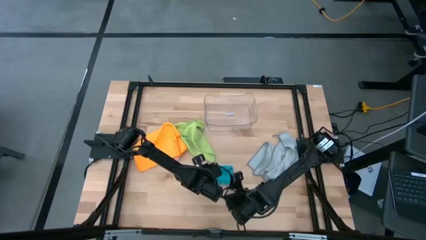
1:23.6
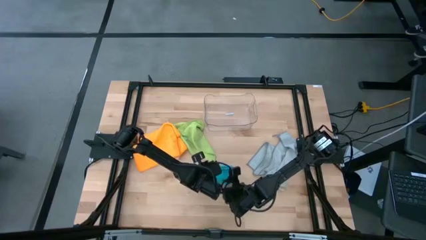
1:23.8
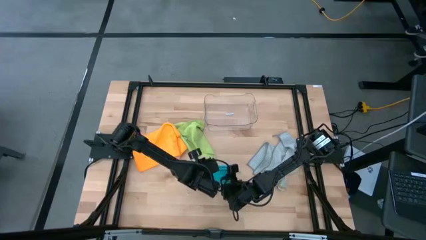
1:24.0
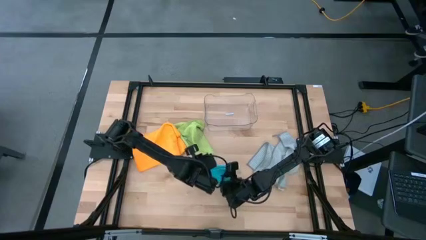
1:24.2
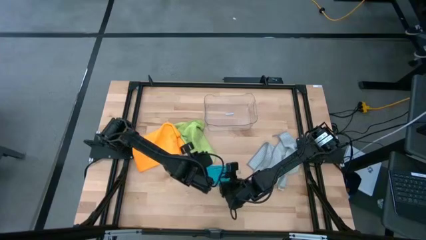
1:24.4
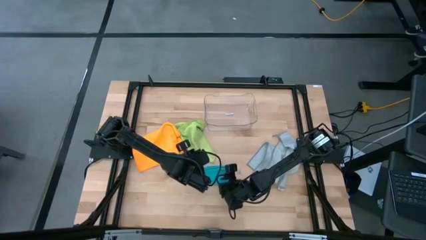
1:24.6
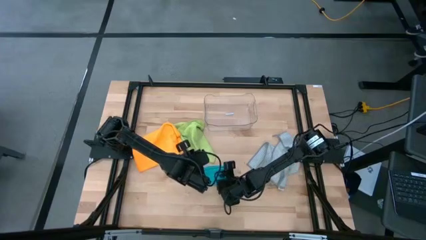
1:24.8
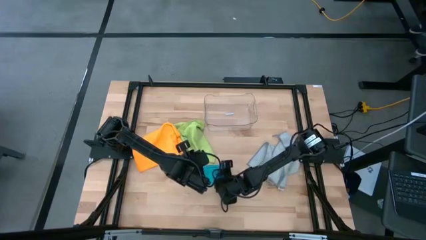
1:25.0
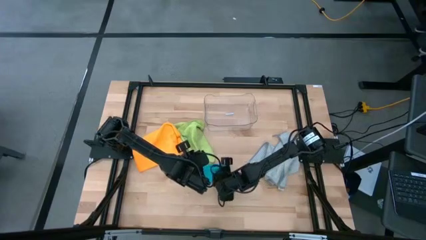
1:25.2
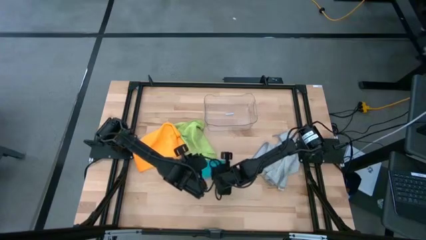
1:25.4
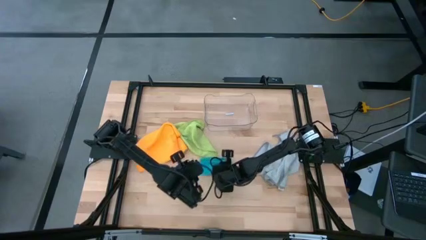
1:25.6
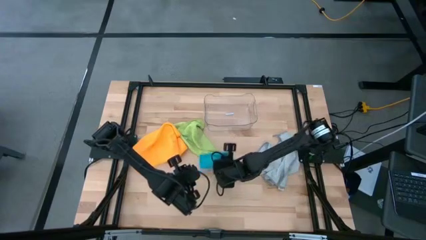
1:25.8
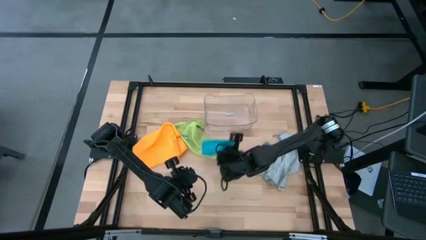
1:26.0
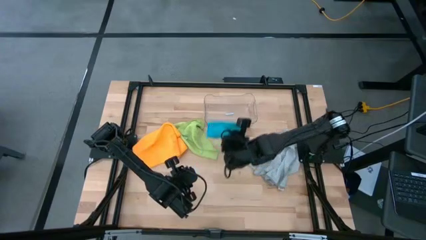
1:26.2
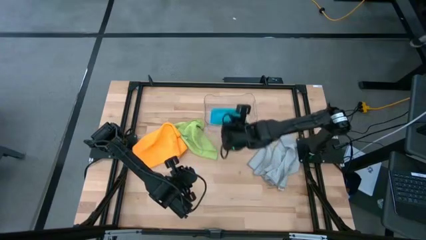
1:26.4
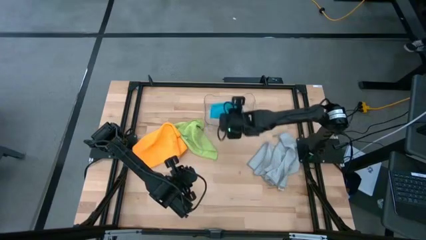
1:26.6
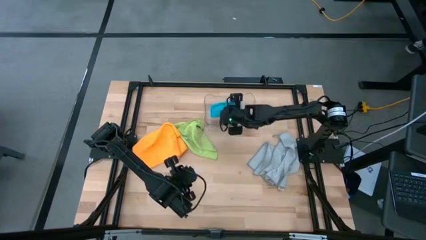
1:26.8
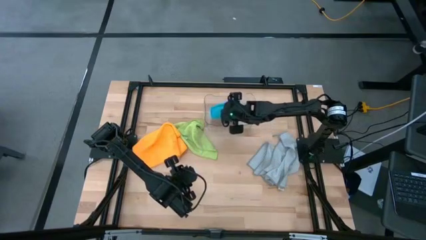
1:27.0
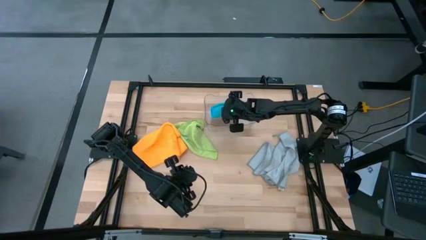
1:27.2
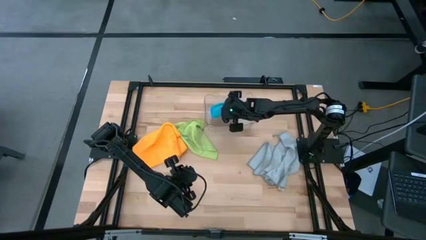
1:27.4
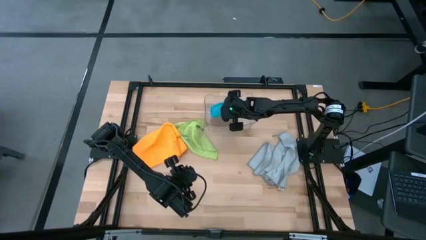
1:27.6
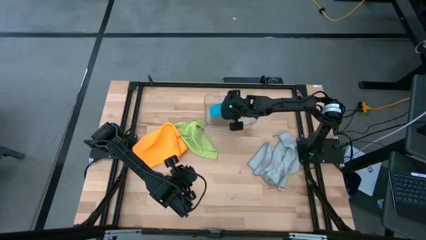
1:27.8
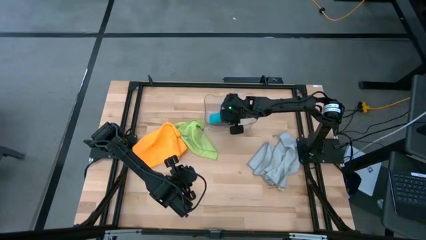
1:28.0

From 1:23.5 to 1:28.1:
Task: Fold microfiber towels
Put the blue towel into the transparent bin

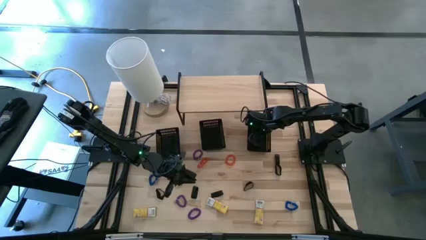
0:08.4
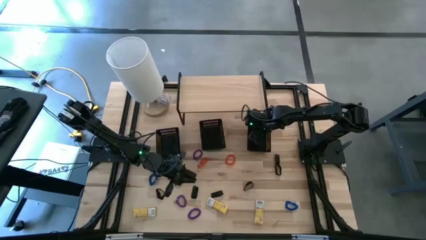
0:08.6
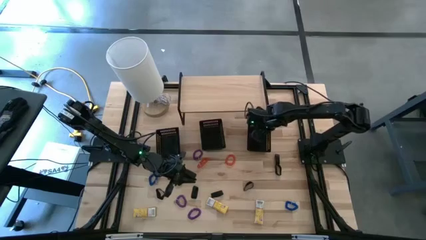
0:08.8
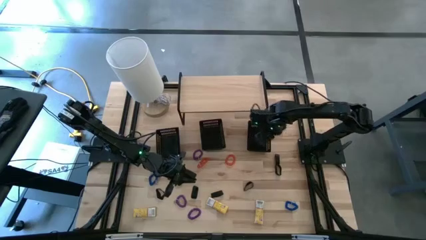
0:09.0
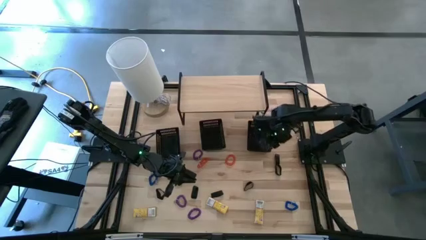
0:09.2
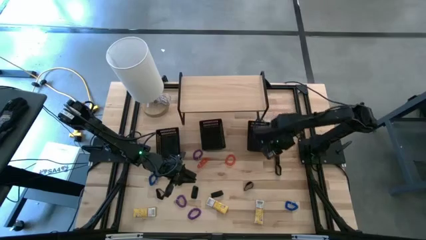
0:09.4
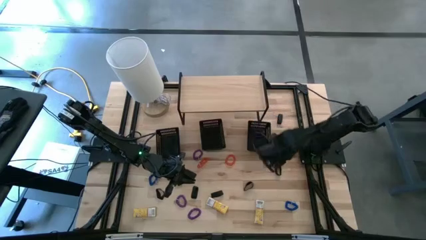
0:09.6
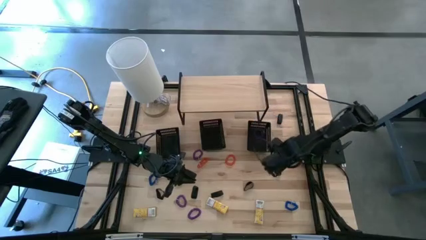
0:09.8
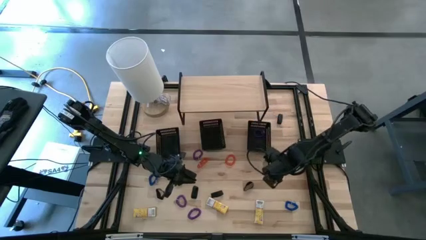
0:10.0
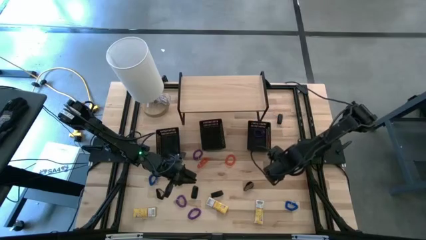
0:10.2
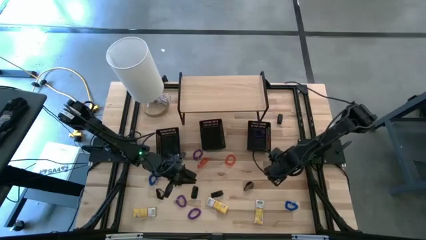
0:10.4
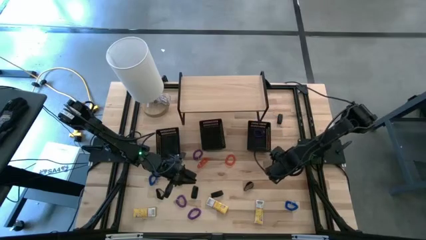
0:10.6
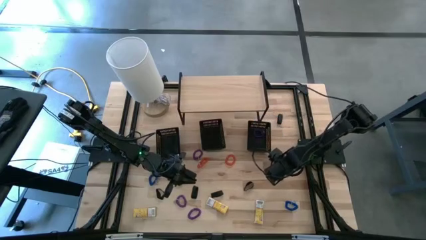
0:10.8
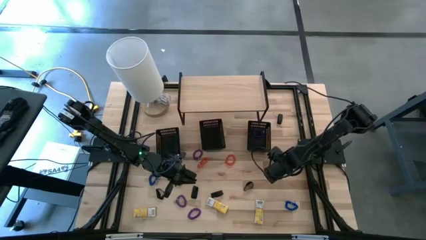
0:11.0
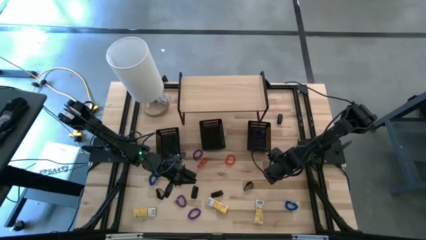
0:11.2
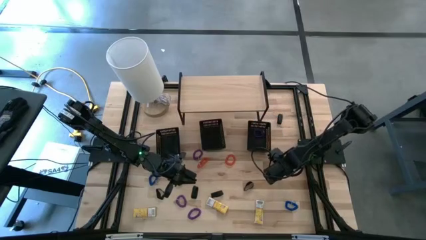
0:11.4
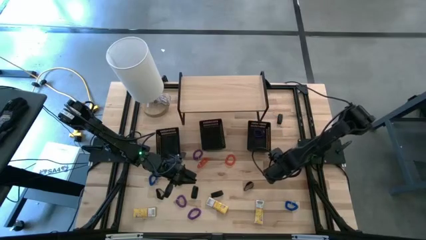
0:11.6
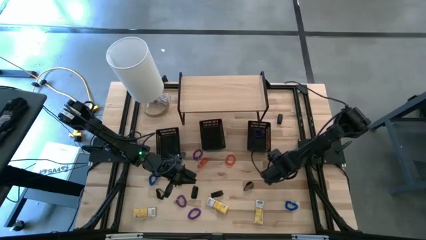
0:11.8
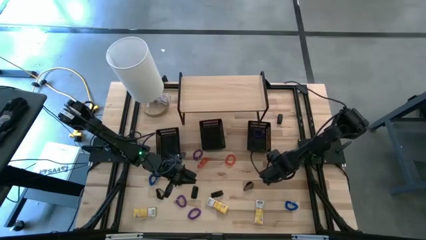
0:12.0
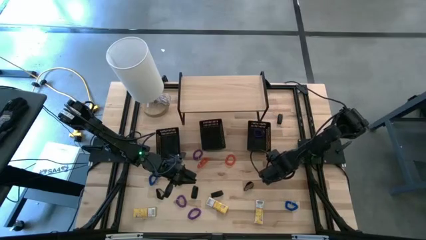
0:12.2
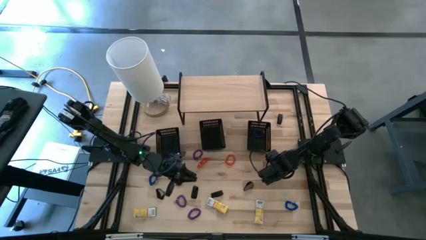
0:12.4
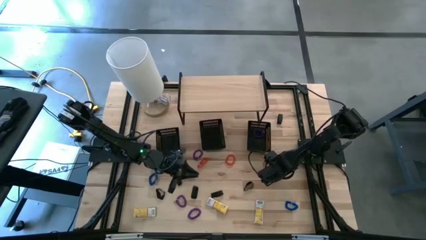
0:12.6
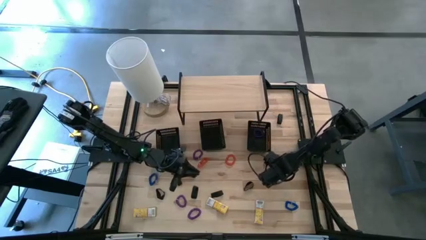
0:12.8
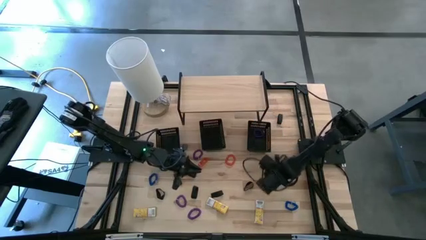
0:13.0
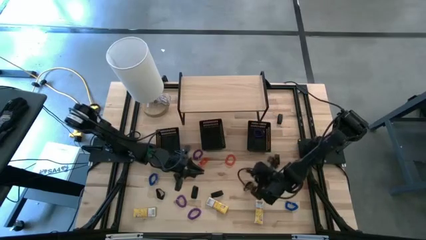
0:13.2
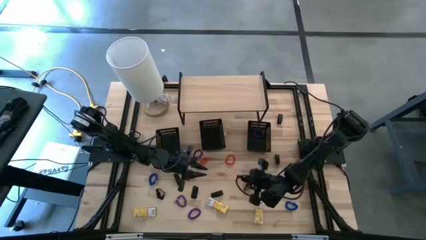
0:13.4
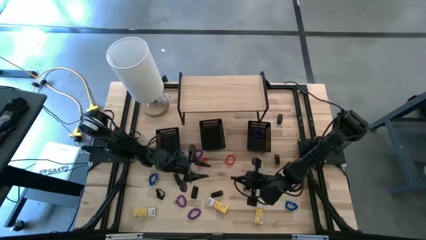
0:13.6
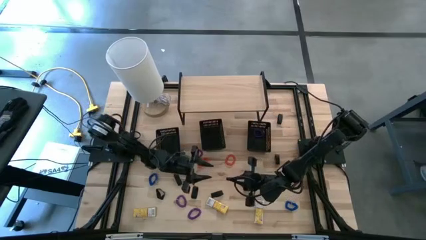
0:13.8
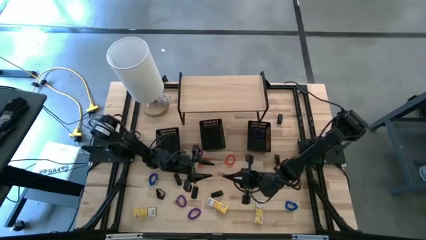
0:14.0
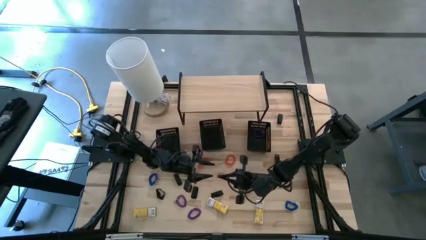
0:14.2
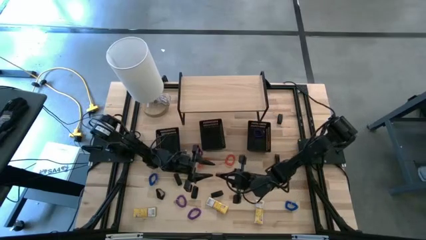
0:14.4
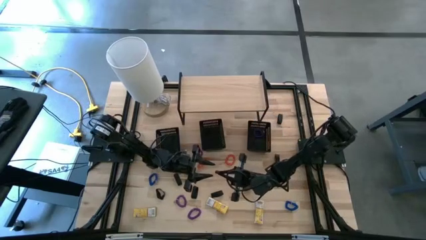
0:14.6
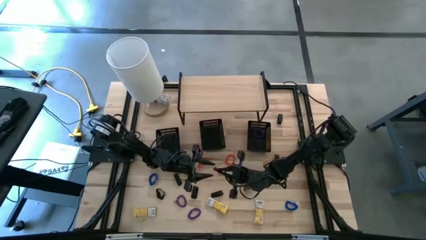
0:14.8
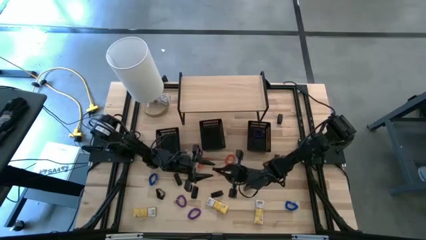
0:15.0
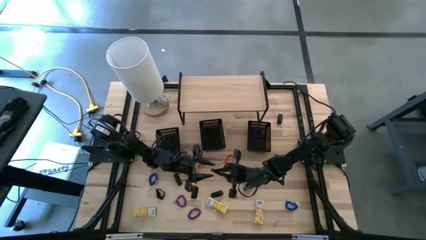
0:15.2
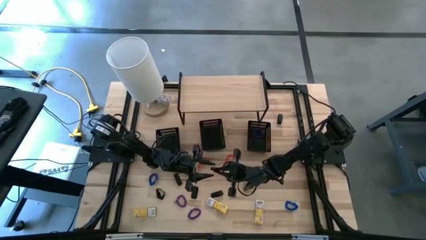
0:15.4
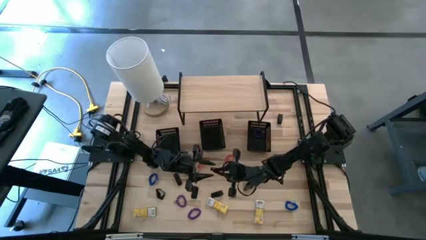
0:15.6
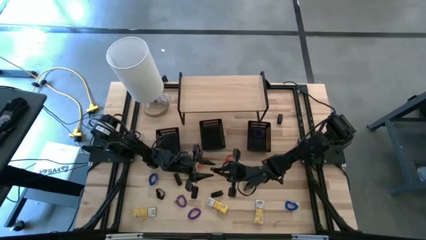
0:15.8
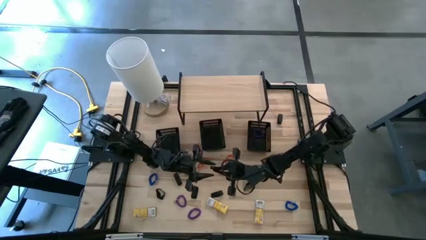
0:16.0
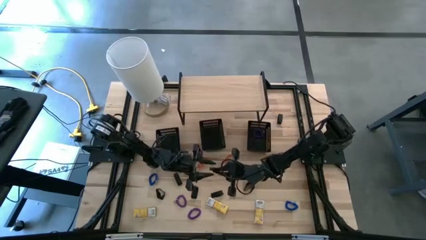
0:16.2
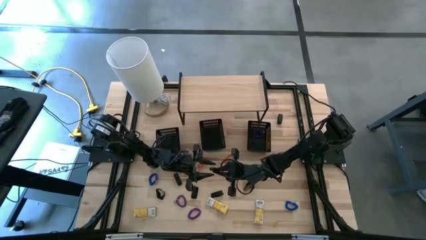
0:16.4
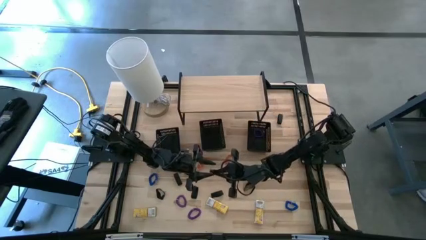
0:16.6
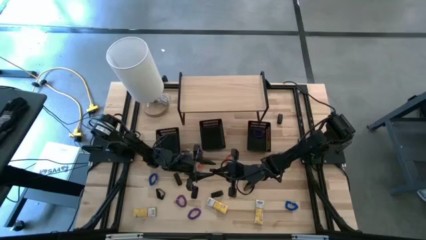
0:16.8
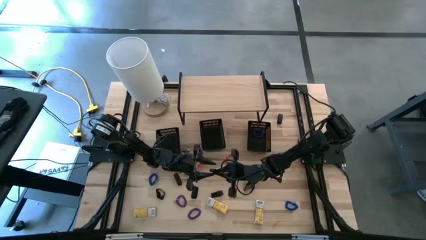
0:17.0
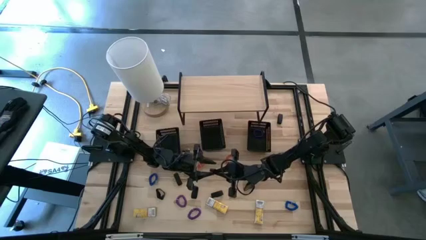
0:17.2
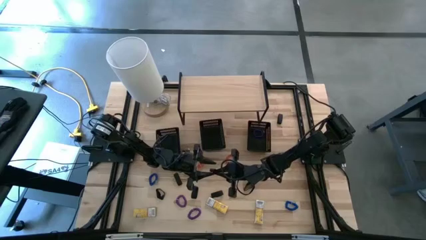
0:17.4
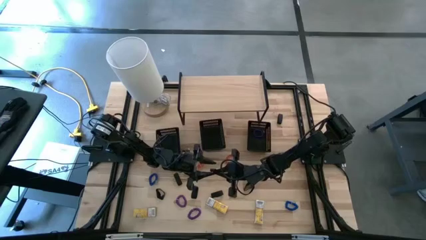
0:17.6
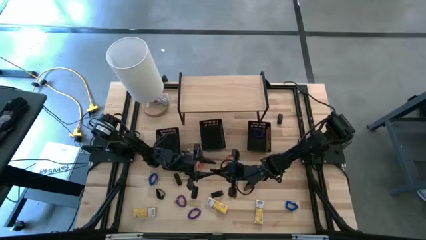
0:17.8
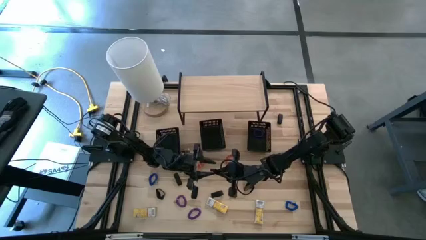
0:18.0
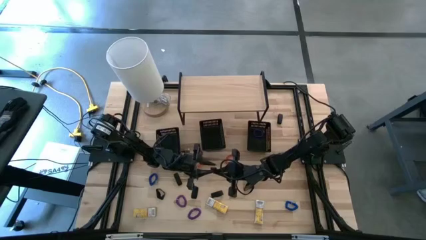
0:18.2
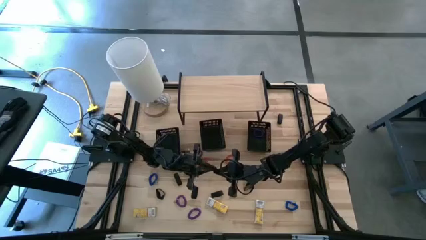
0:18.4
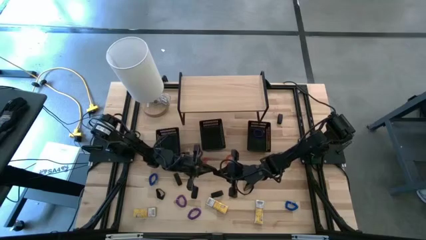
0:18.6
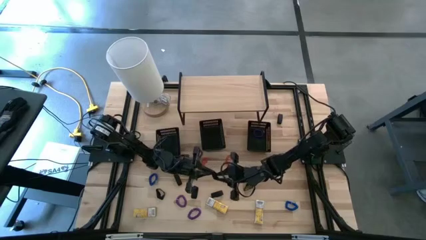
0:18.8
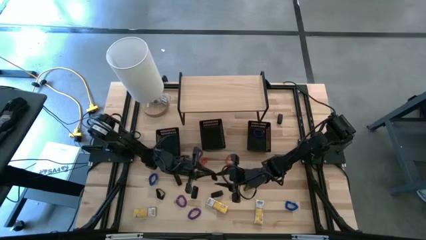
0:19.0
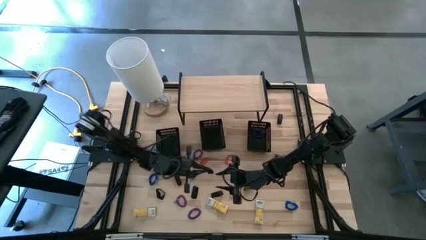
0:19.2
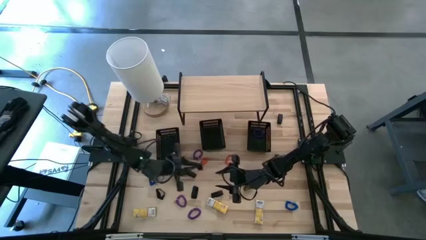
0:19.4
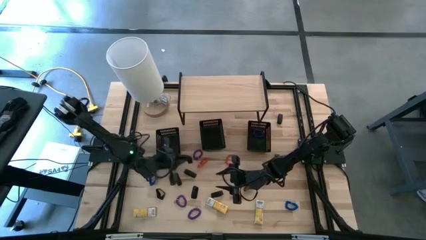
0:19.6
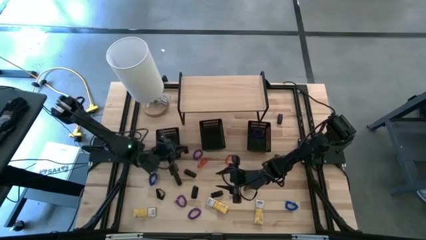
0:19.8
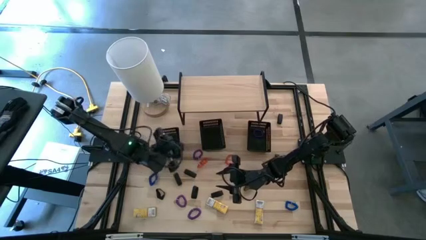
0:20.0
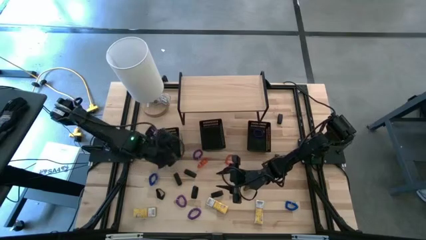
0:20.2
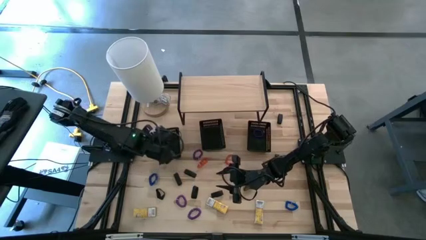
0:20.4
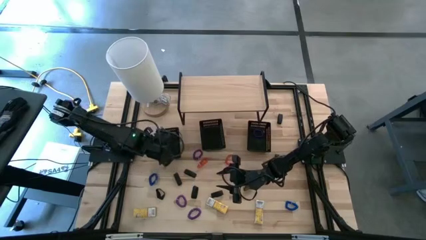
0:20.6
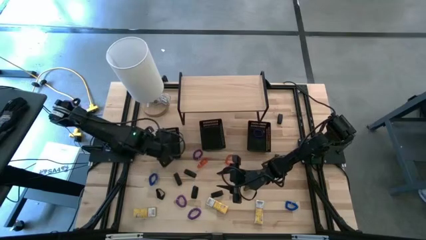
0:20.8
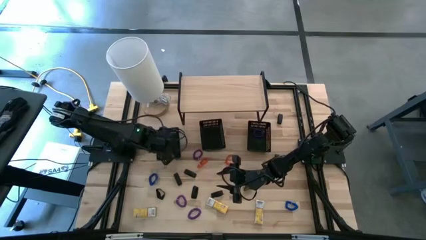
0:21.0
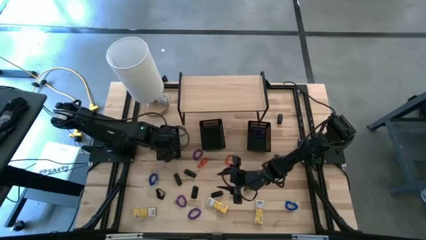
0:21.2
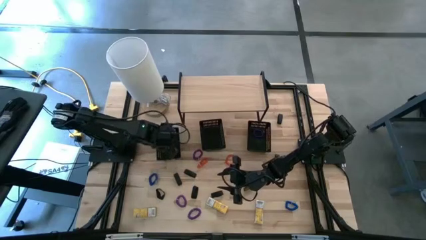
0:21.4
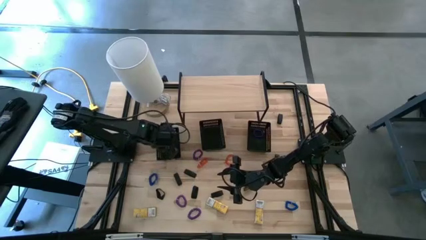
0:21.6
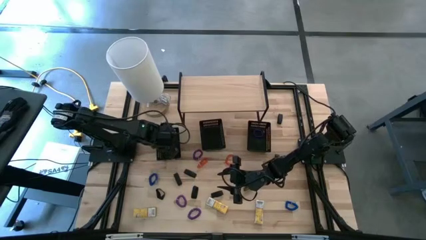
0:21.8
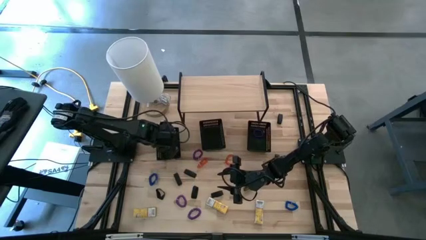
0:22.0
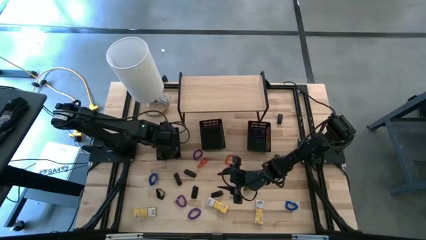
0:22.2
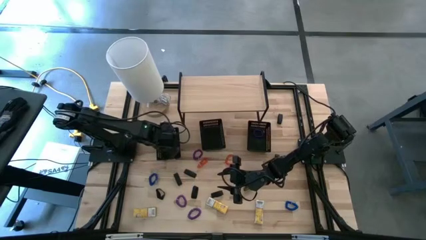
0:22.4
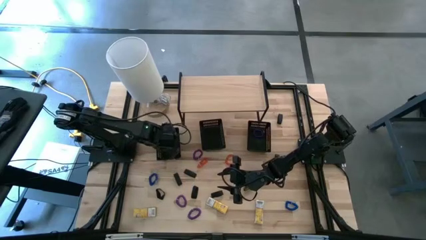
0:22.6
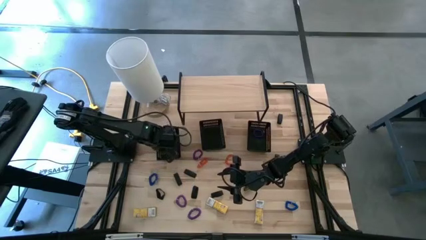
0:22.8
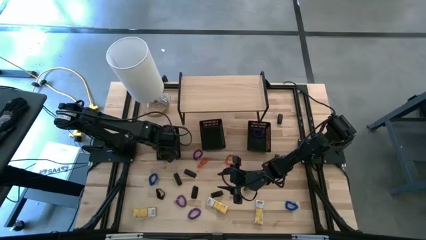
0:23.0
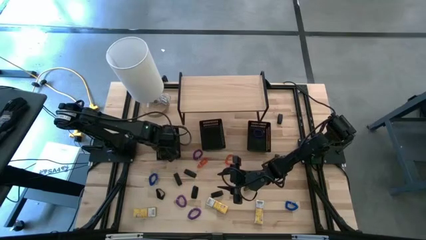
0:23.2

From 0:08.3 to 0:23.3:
Task: Pick & Place Office Desk Supplies
Put the black rubber band into the left black bin
